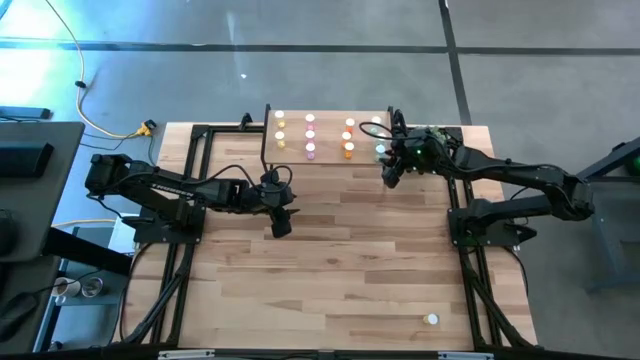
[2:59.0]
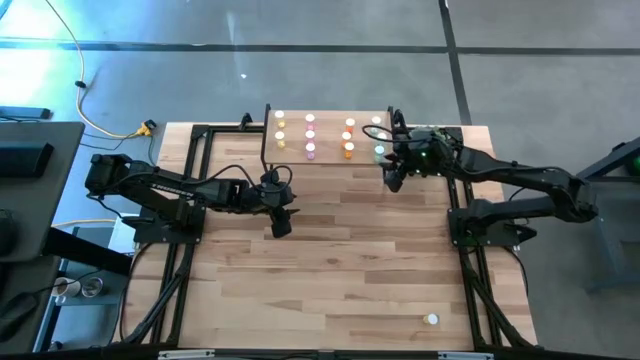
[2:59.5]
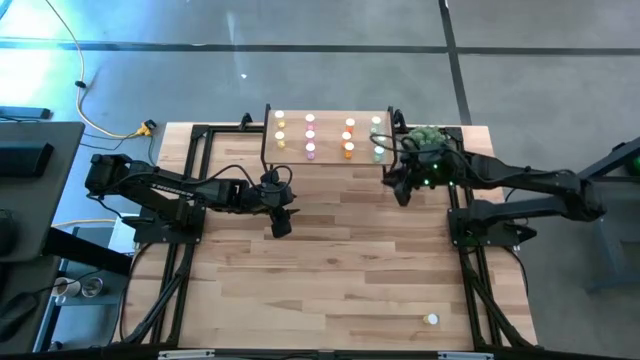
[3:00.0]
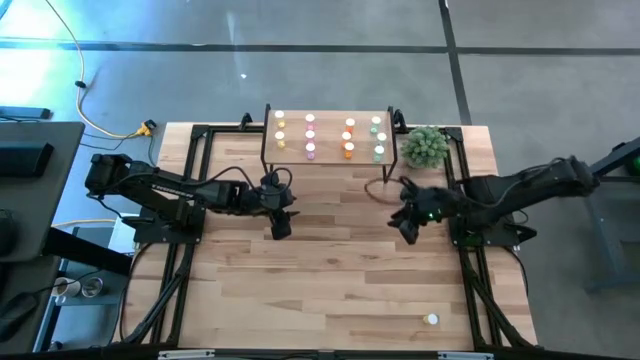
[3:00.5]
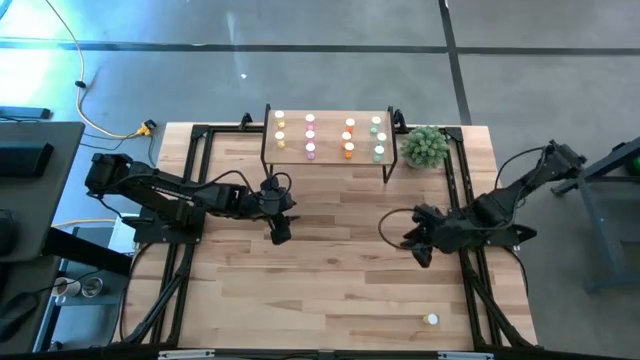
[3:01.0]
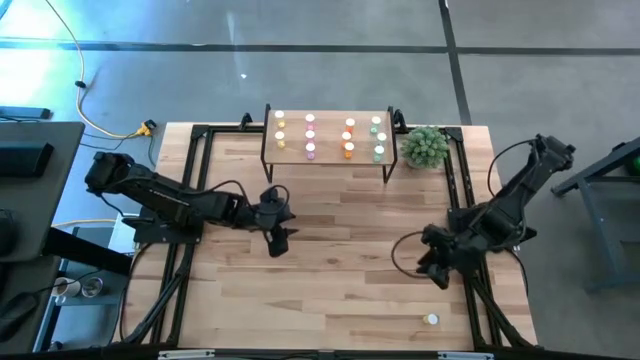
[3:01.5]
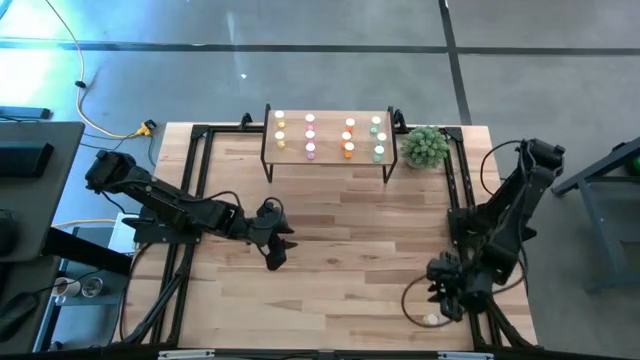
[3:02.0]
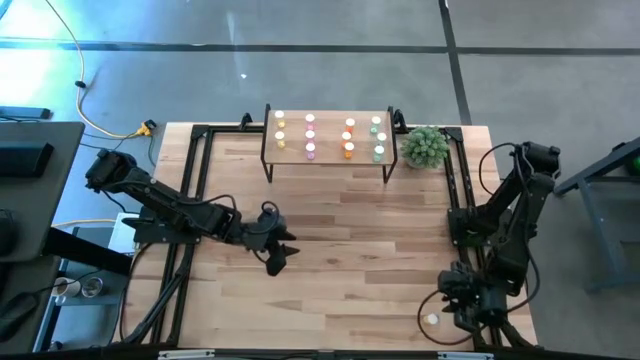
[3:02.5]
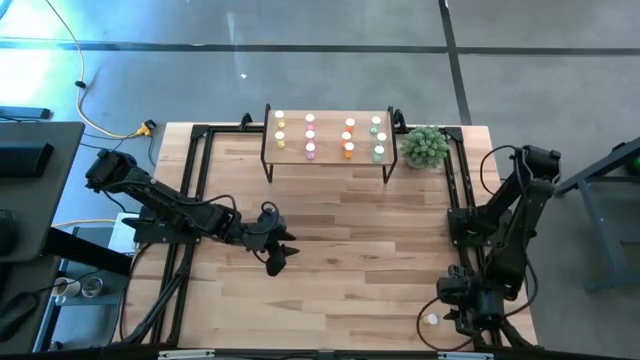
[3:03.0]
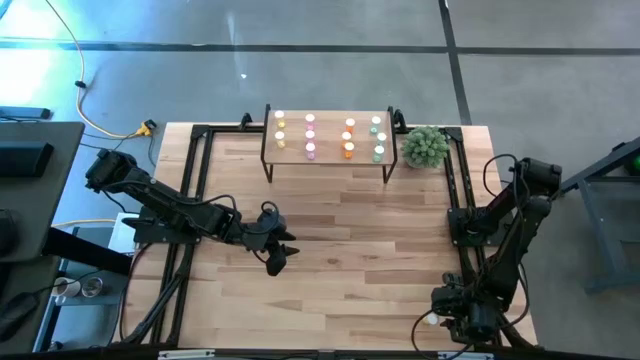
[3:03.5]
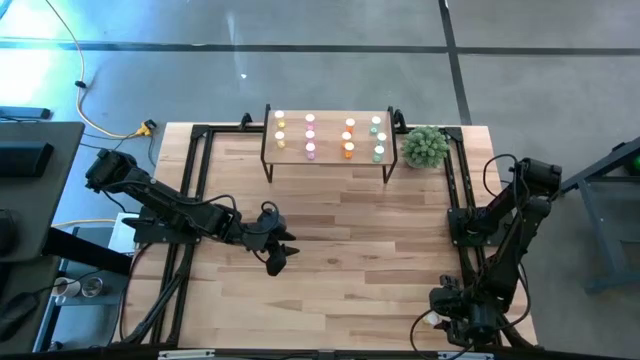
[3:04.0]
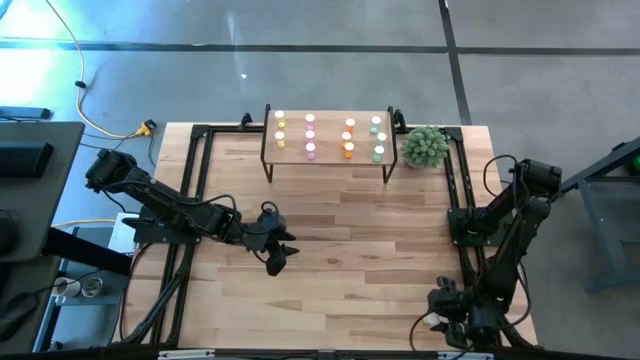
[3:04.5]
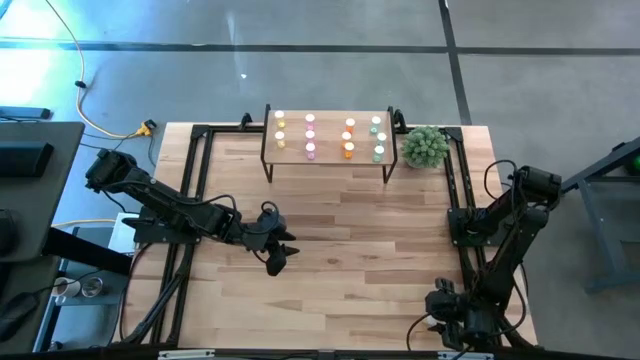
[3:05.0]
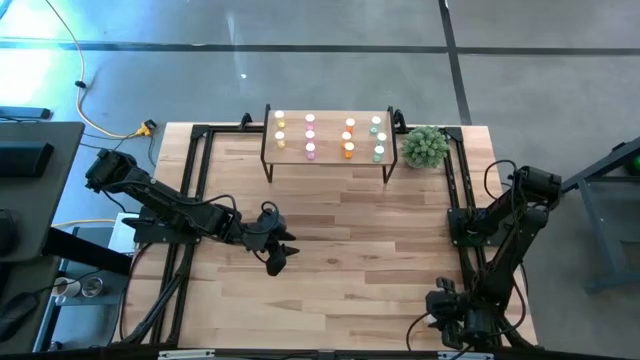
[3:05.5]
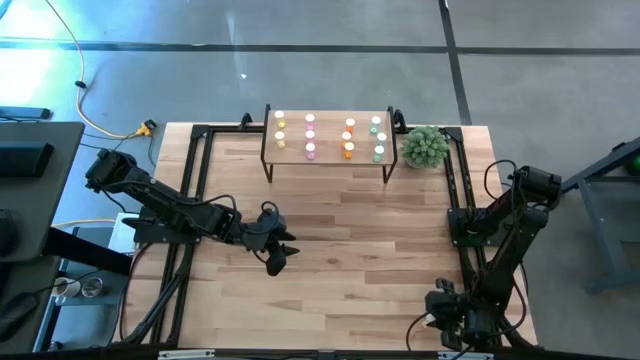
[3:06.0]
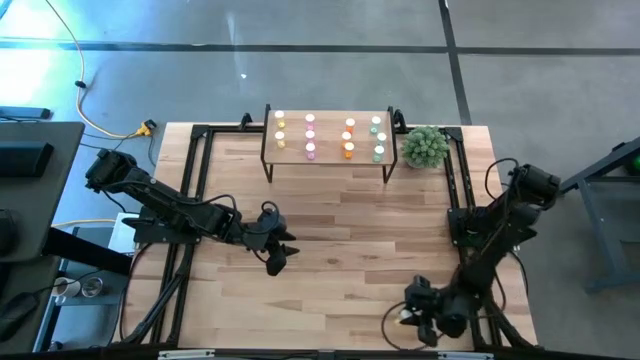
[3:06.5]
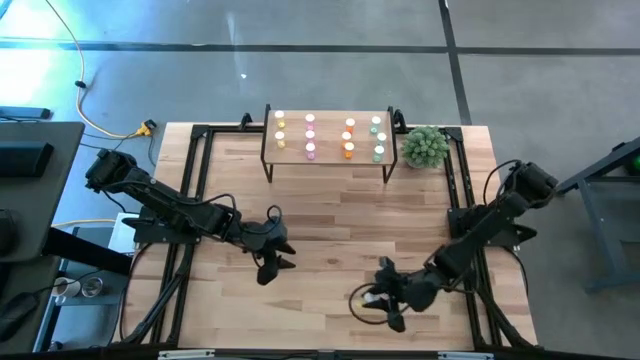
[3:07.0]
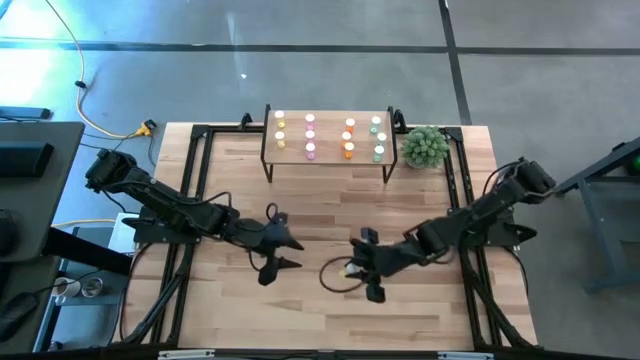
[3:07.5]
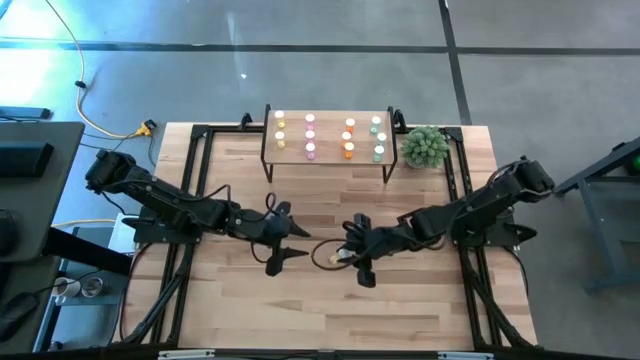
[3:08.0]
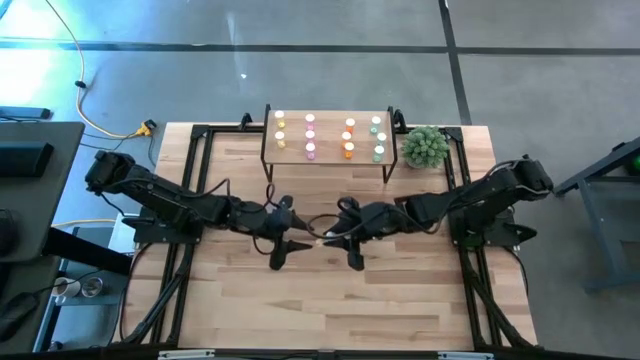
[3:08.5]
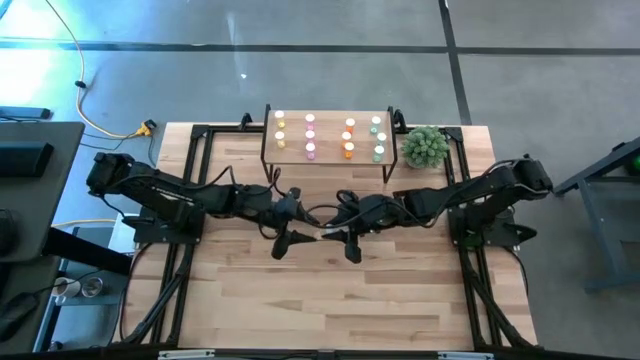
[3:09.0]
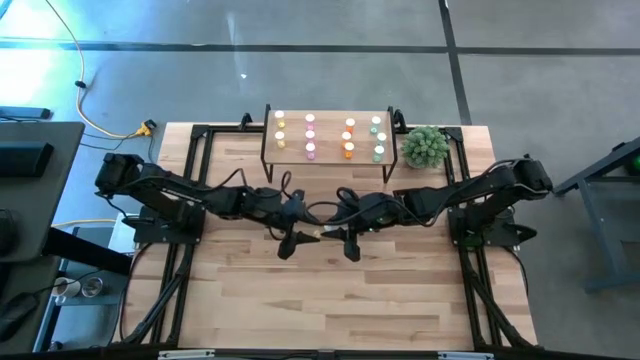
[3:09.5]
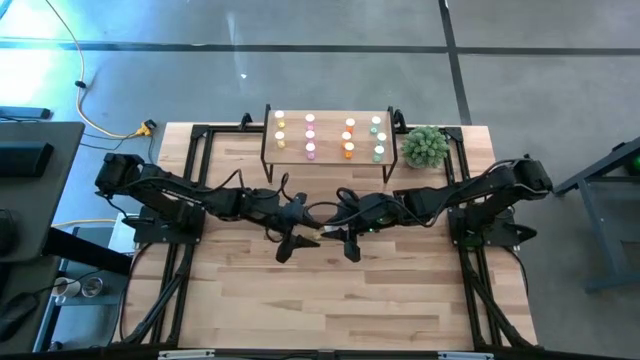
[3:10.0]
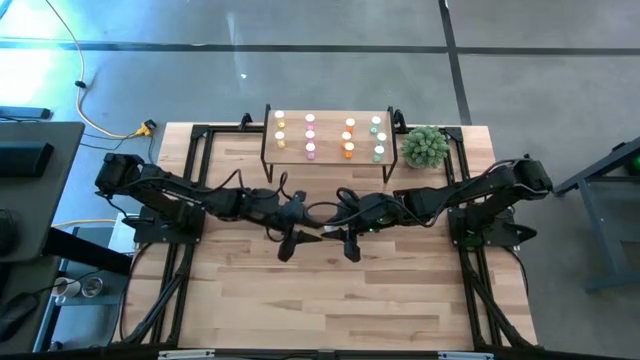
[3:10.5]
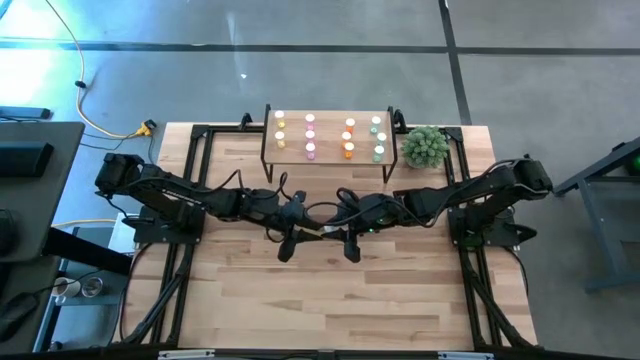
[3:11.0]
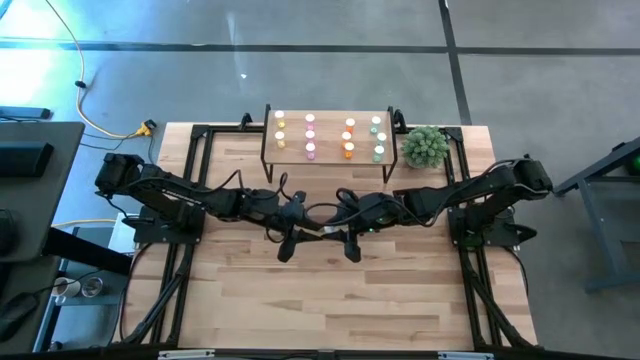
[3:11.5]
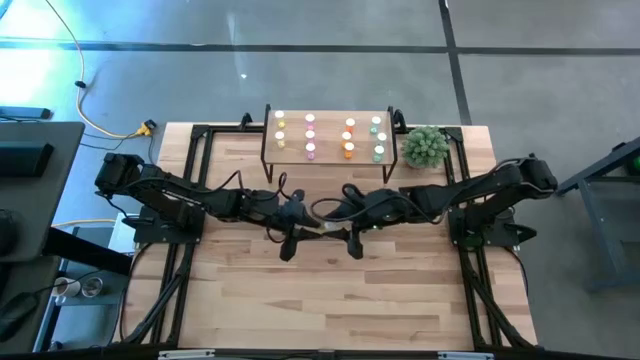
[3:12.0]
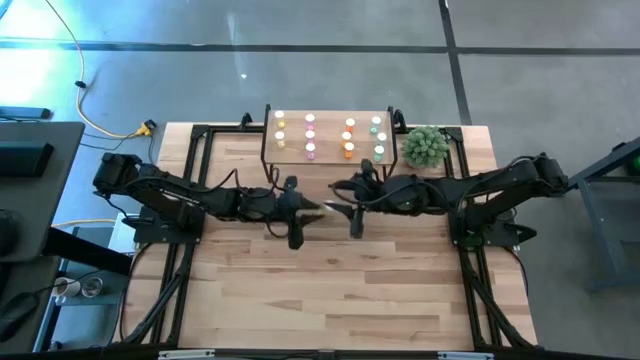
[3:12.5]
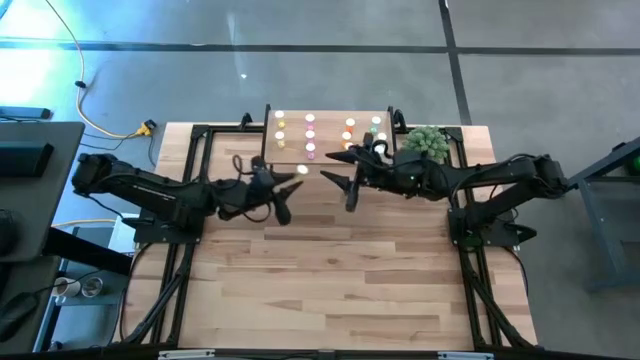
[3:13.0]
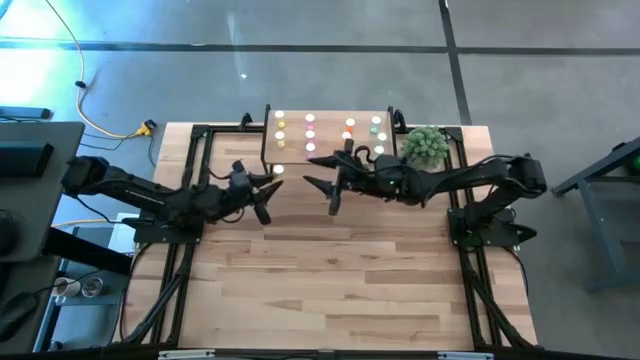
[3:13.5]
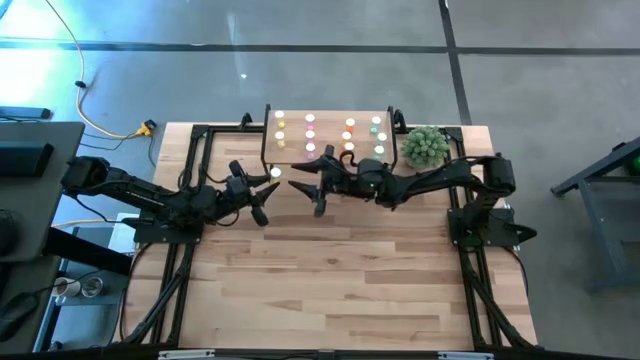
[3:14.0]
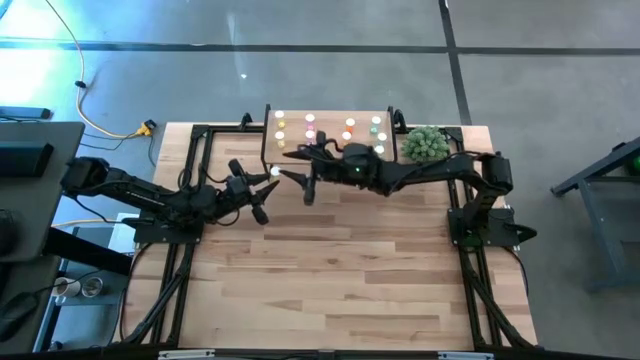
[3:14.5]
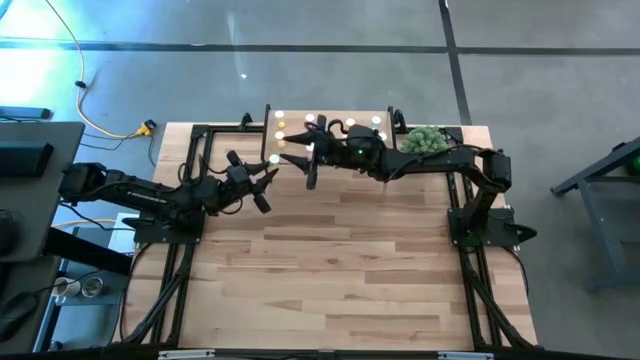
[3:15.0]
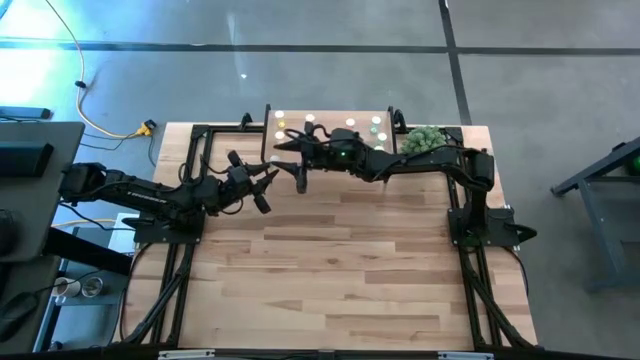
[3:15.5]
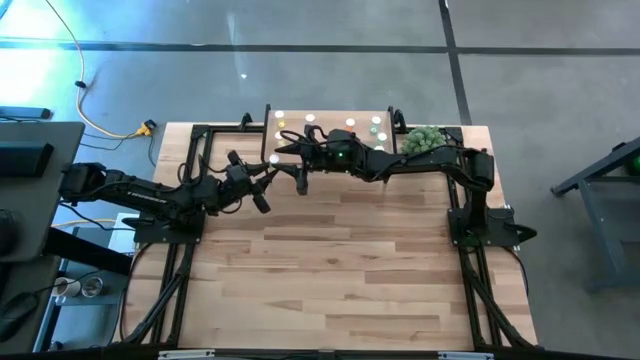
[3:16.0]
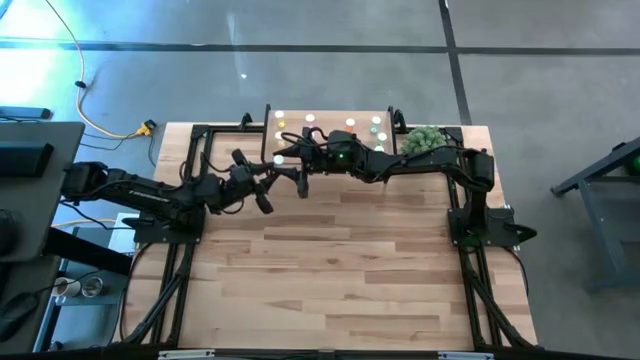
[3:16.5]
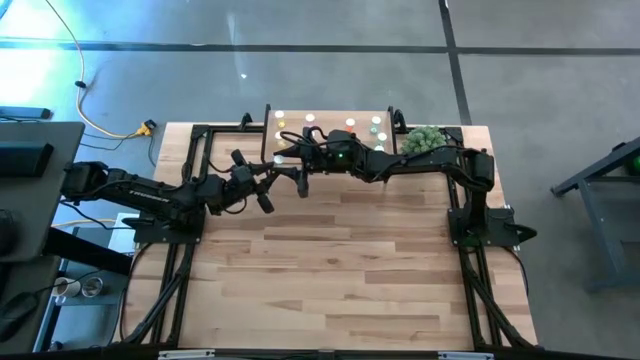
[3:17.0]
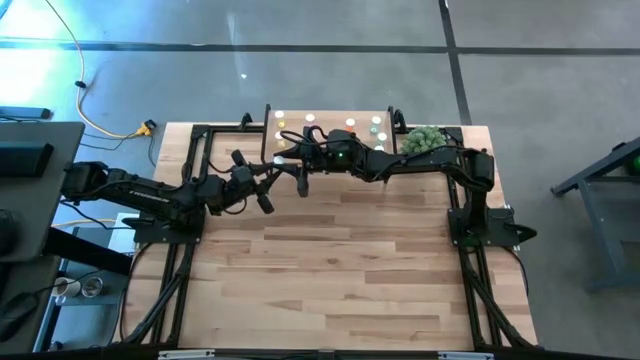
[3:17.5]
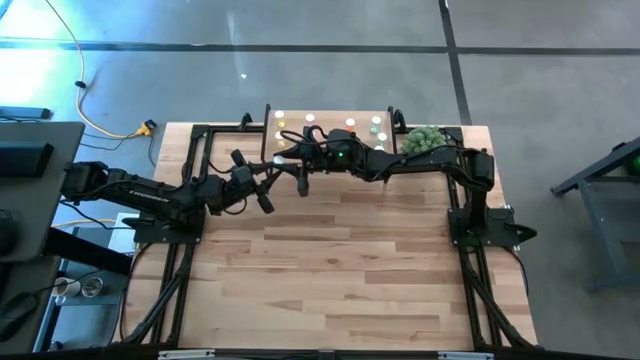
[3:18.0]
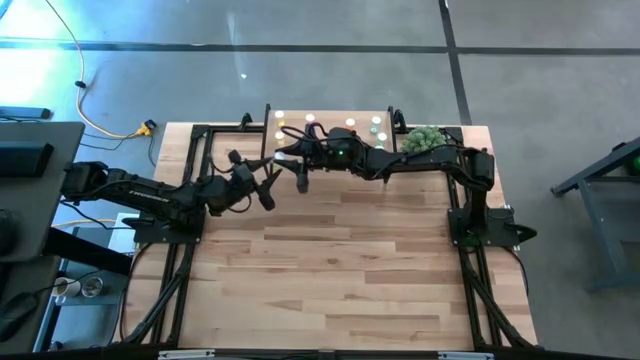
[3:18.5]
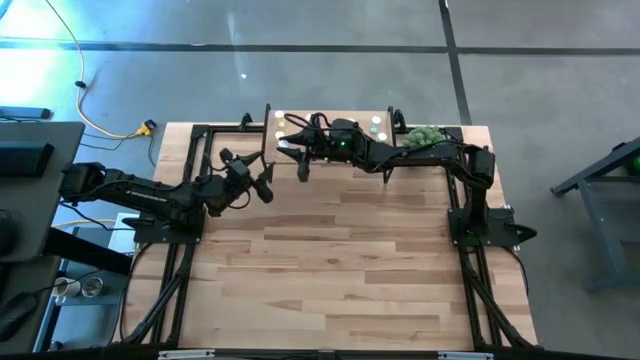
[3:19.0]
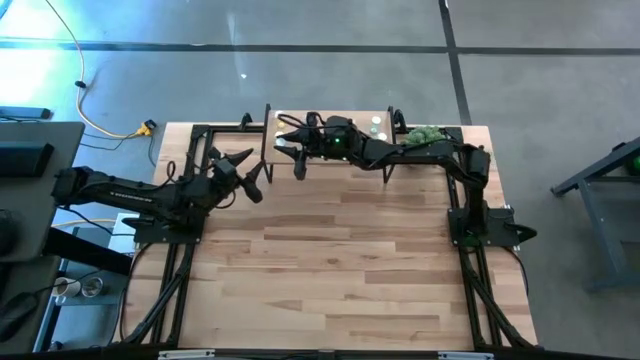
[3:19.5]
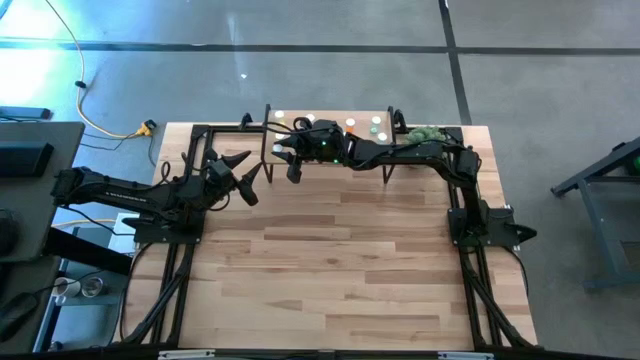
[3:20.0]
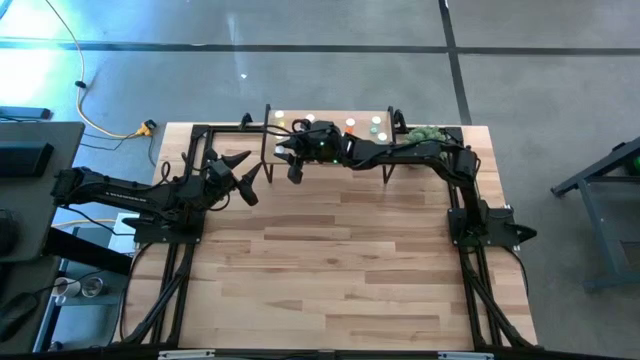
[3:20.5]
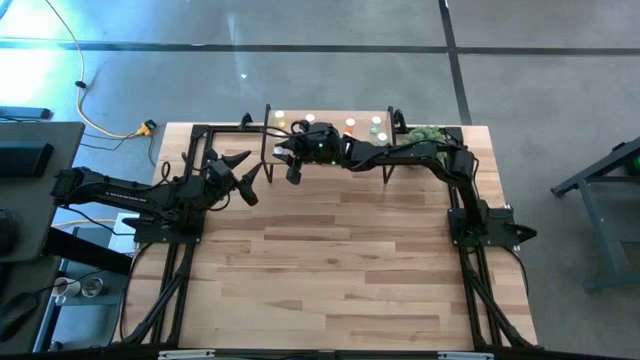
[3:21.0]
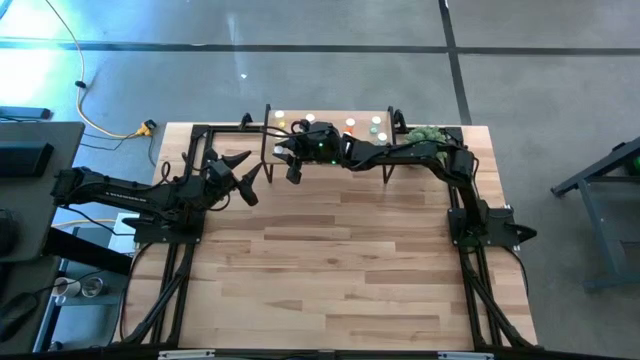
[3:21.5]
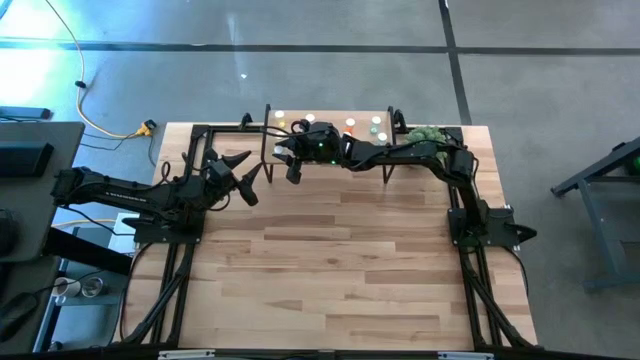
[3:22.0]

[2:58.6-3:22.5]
Task: Pick and place medicine bottles onto shelf by color
Put the yellow pill bottle on the shelf aligned with the other yellow pill bottles
